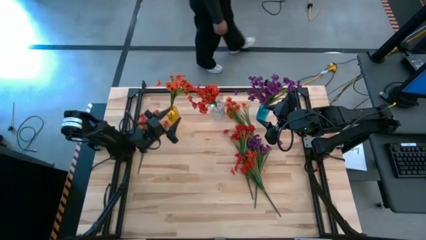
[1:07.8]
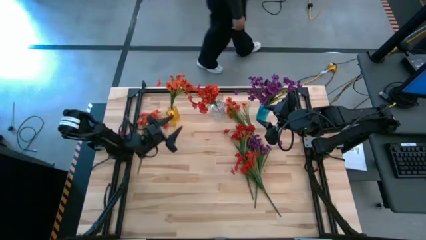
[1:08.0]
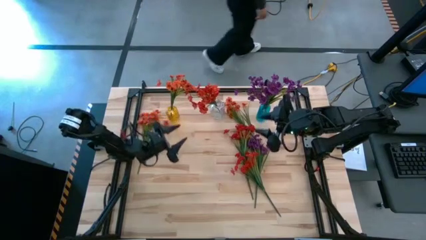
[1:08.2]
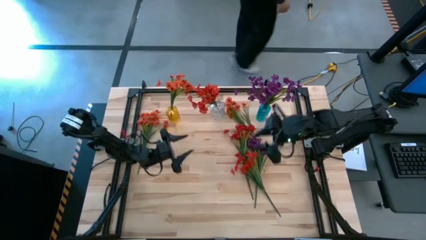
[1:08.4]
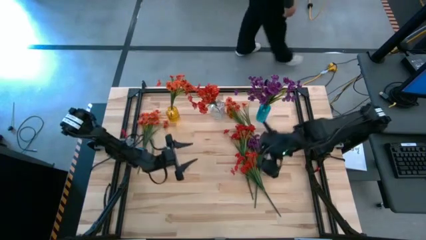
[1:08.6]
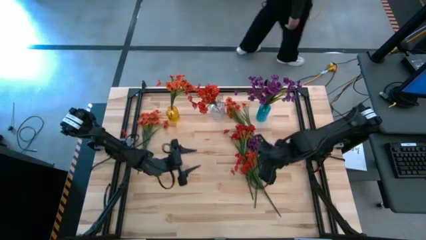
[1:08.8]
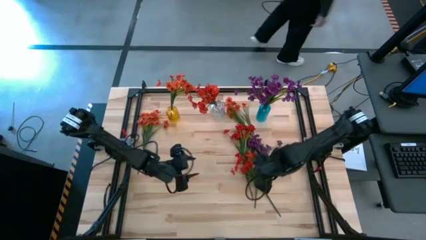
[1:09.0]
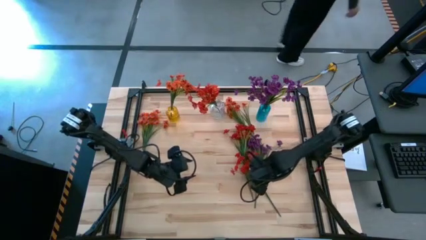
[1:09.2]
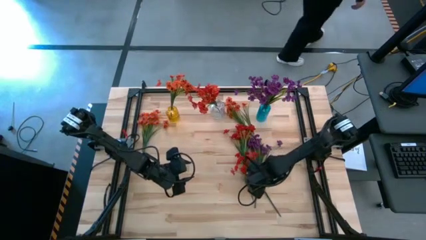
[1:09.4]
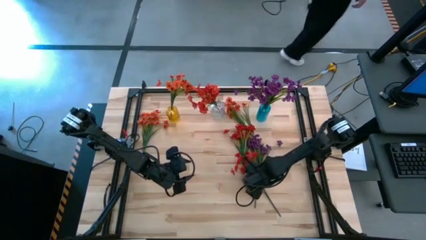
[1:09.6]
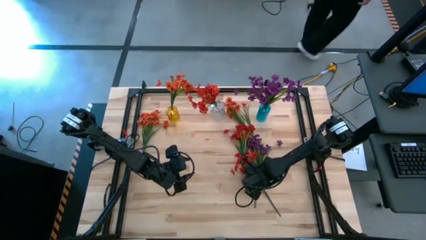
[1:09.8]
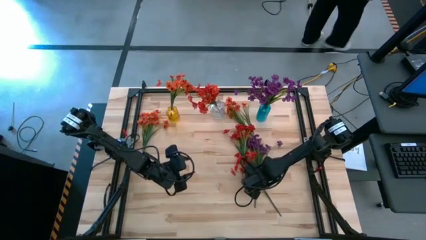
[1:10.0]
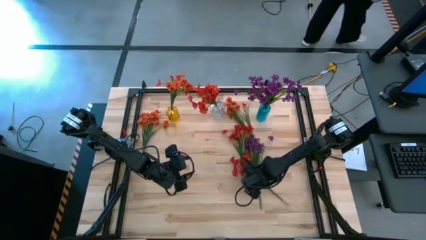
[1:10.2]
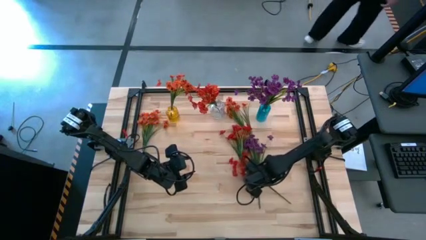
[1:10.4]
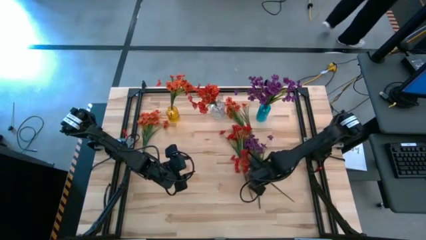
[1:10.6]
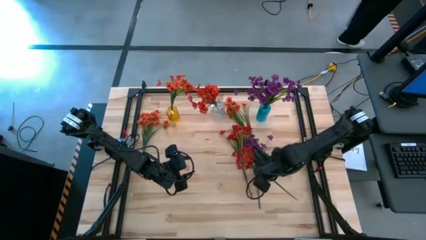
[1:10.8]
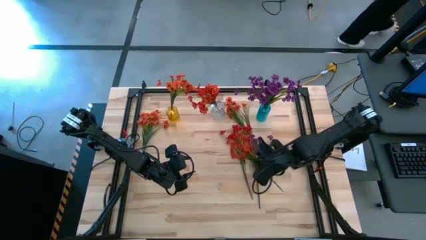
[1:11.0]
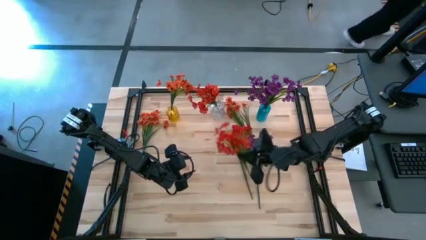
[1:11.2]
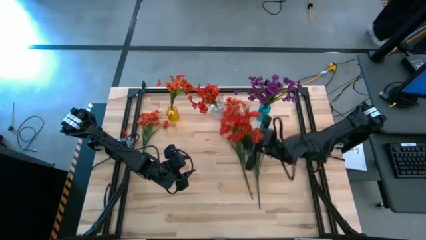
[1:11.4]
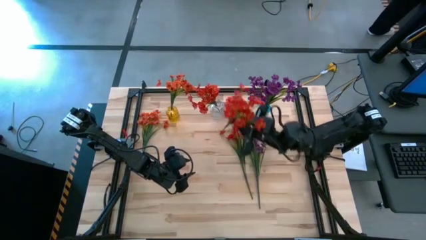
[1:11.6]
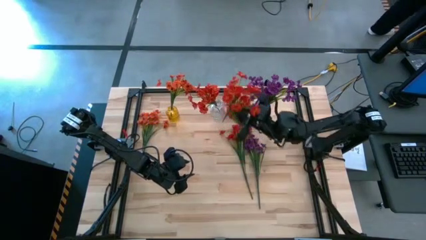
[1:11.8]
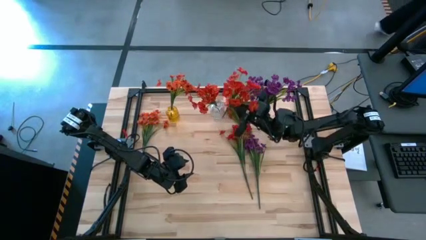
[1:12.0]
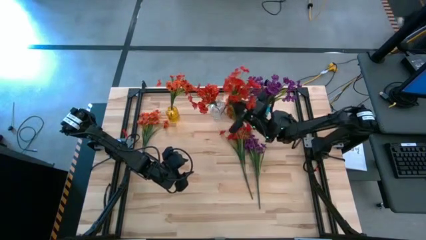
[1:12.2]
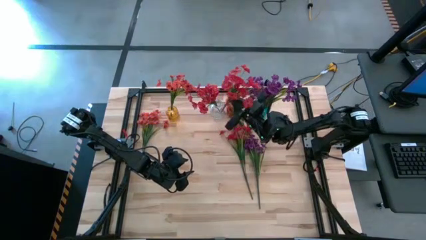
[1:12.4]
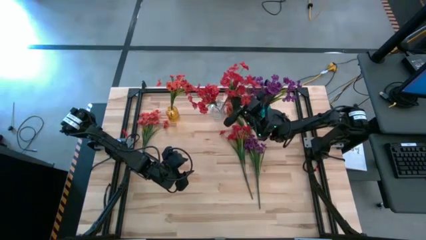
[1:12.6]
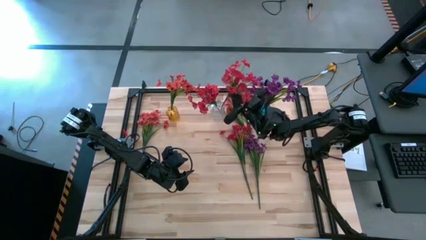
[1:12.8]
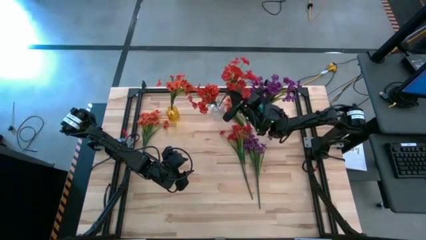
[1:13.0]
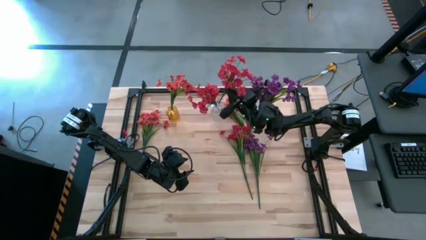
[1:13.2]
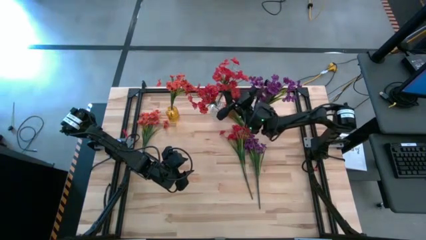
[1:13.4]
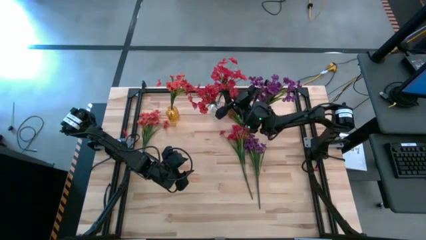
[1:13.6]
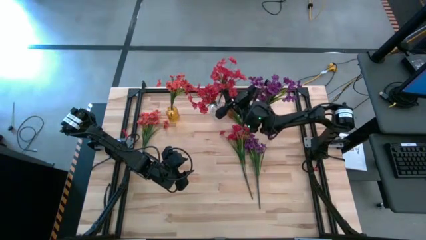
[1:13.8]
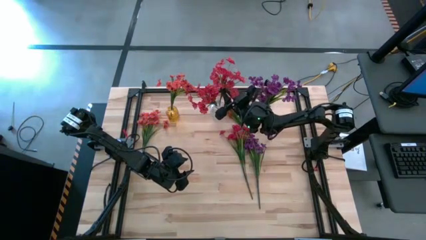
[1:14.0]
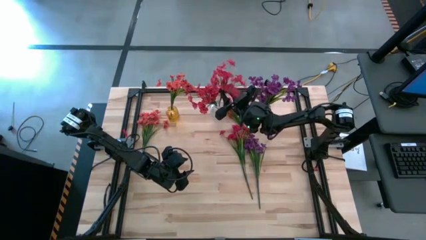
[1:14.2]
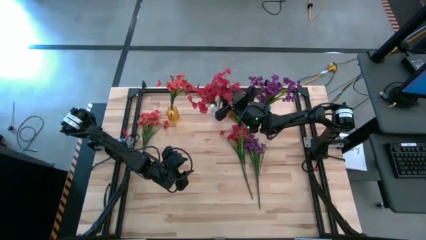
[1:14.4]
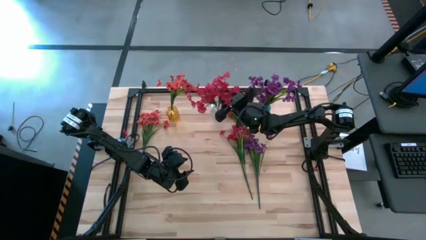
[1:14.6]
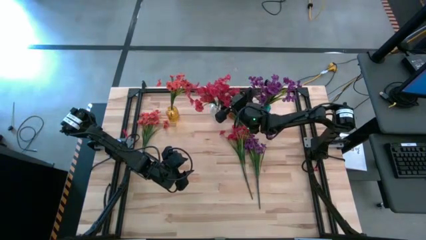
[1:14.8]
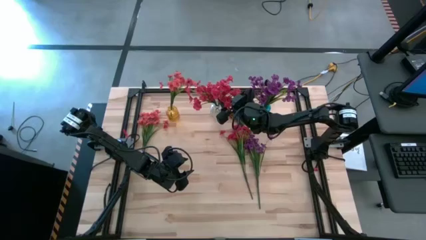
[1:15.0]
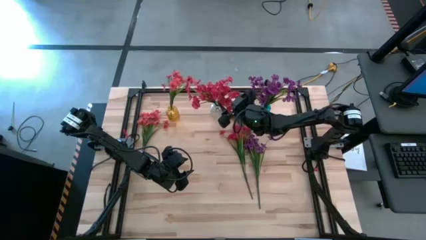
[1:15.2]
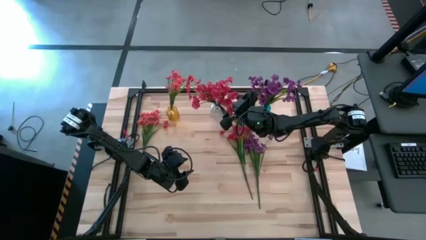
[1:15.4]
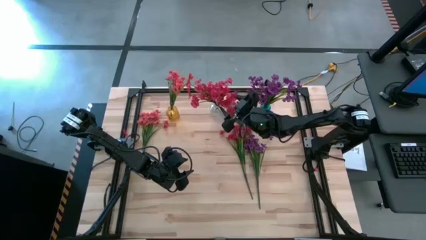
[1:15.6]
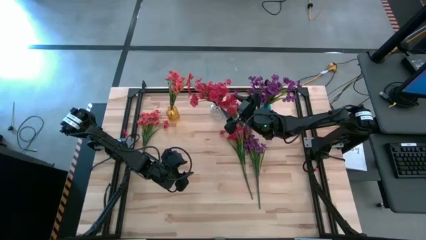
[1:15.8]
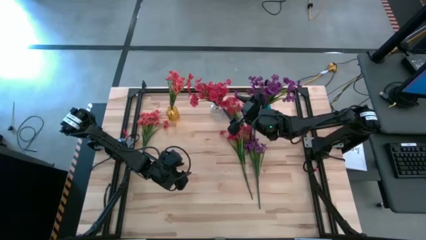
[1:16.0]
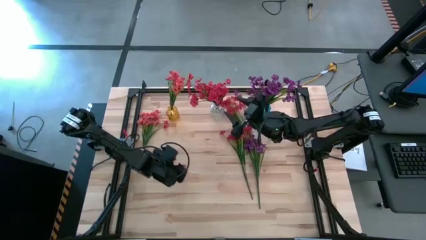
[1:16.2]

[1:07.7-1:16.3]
Task: Sort flowers into vase by color
Put the red flowers into the transparent vase

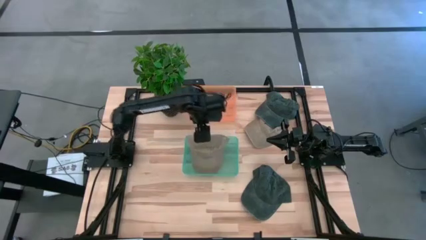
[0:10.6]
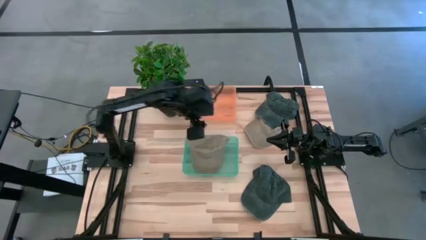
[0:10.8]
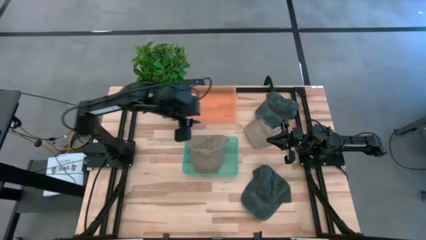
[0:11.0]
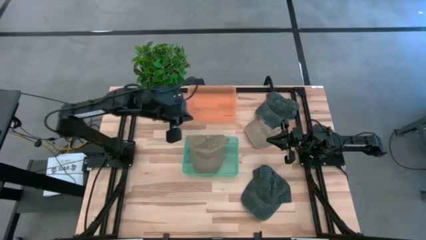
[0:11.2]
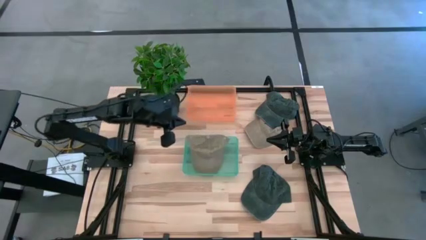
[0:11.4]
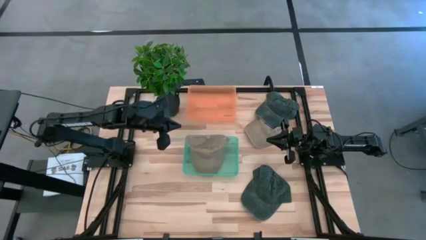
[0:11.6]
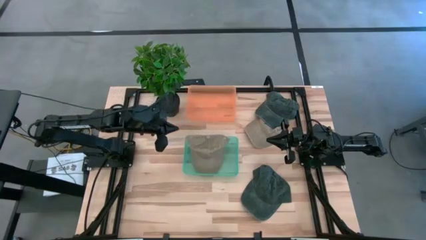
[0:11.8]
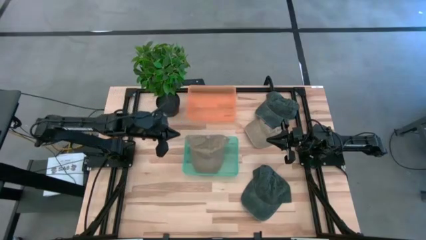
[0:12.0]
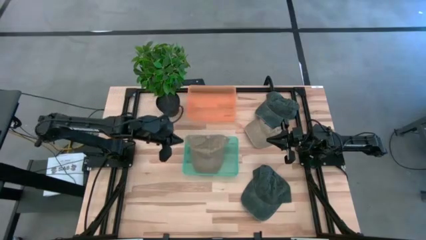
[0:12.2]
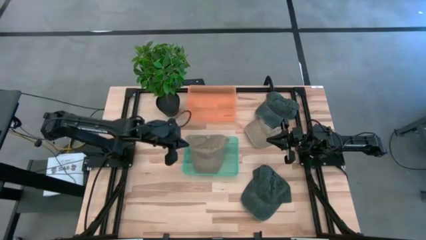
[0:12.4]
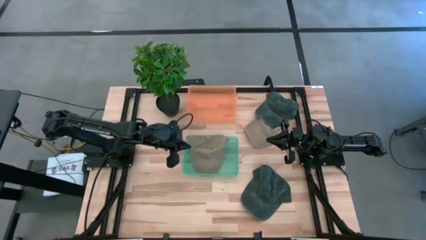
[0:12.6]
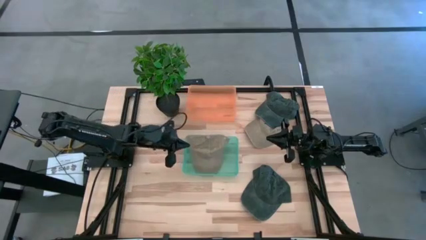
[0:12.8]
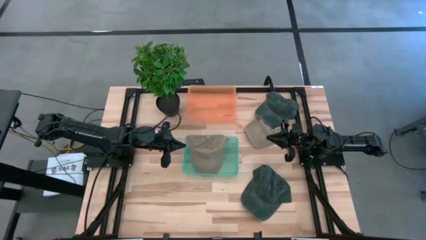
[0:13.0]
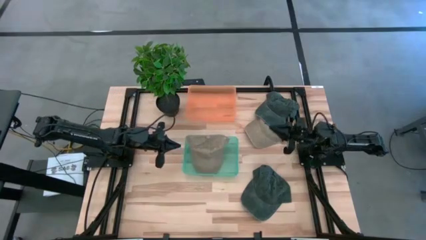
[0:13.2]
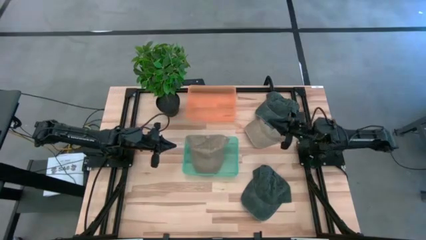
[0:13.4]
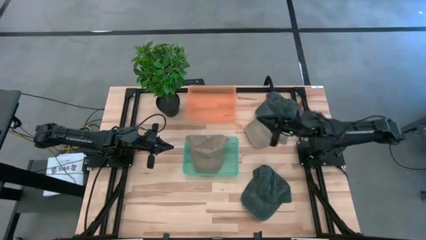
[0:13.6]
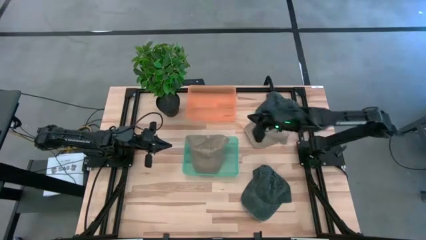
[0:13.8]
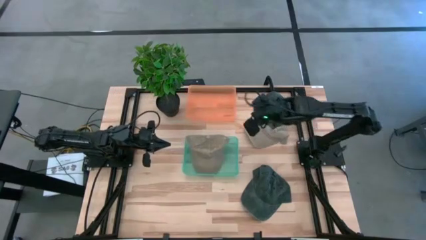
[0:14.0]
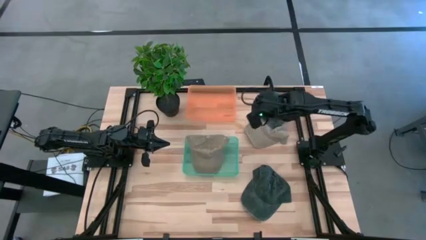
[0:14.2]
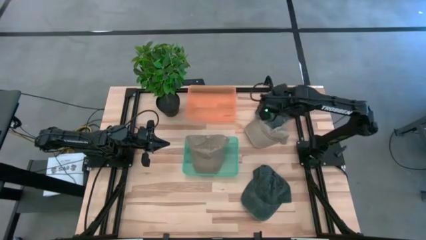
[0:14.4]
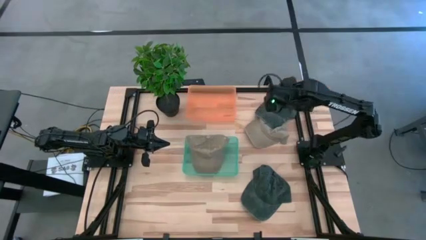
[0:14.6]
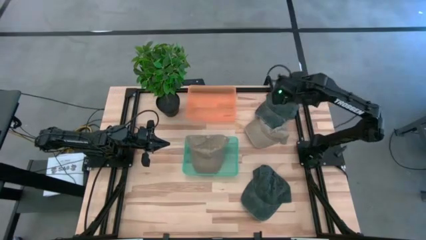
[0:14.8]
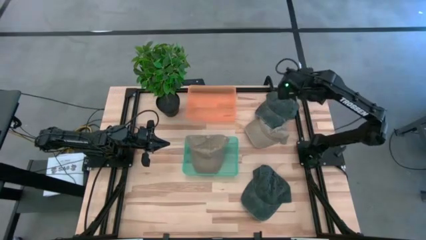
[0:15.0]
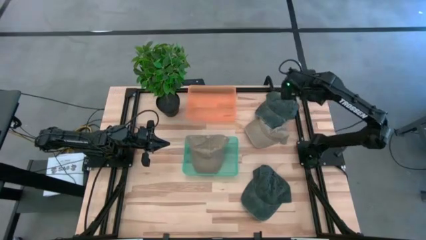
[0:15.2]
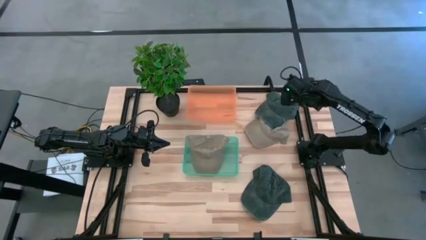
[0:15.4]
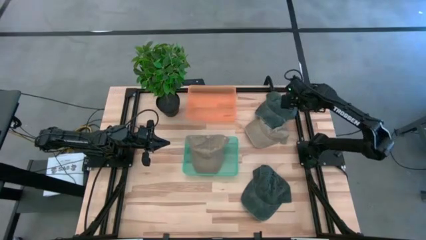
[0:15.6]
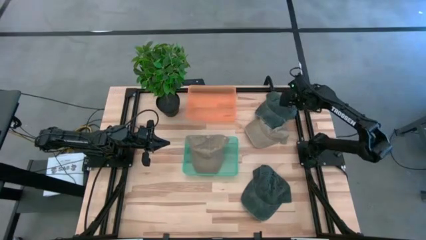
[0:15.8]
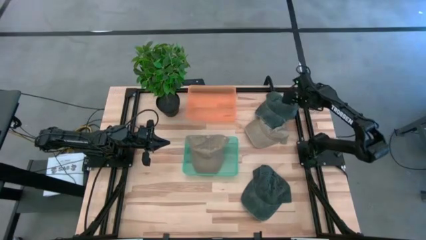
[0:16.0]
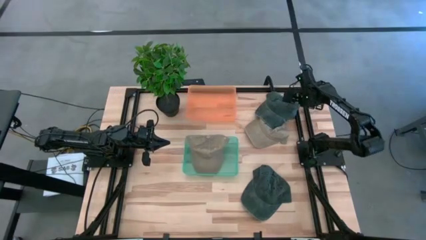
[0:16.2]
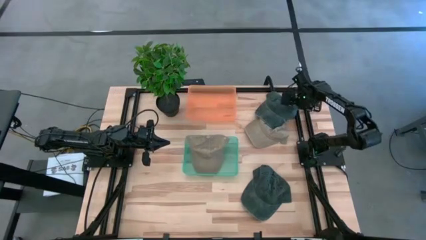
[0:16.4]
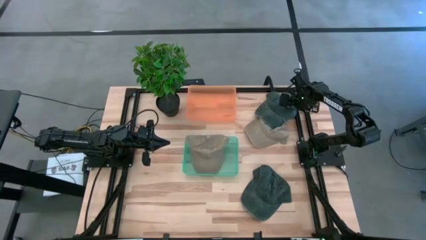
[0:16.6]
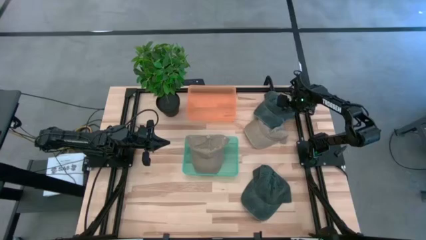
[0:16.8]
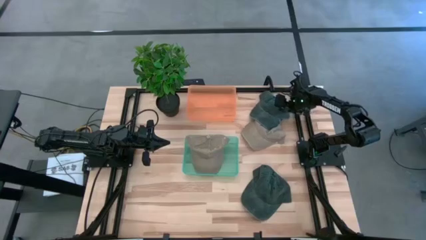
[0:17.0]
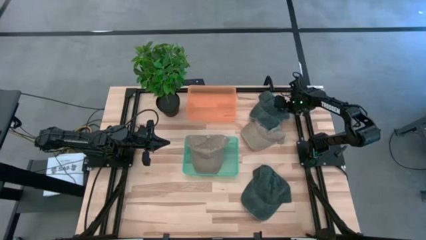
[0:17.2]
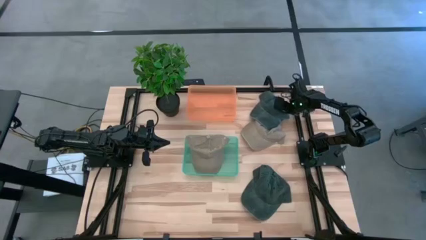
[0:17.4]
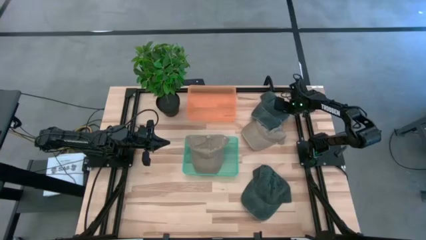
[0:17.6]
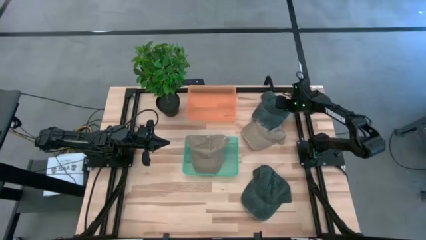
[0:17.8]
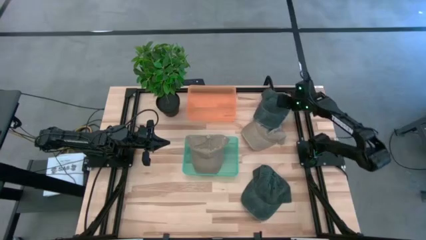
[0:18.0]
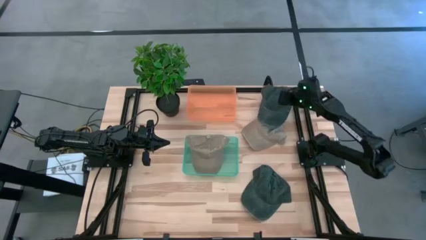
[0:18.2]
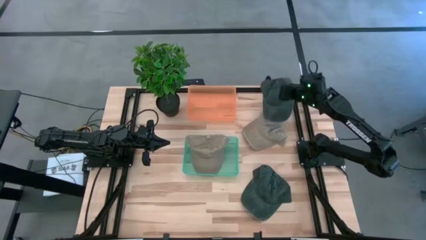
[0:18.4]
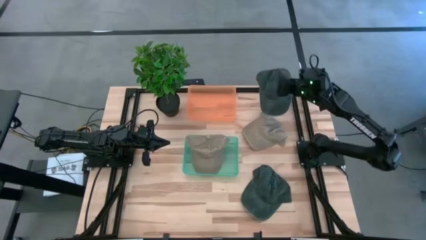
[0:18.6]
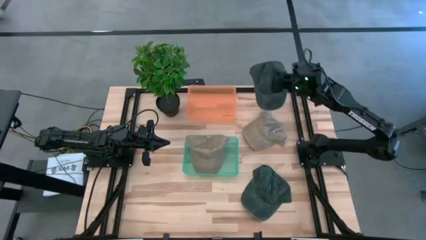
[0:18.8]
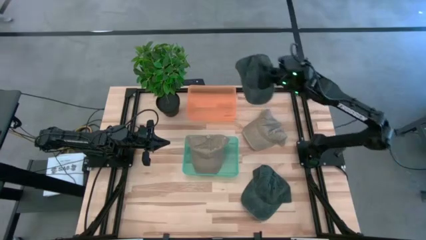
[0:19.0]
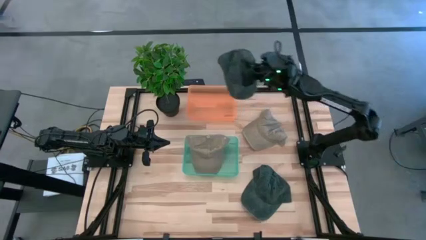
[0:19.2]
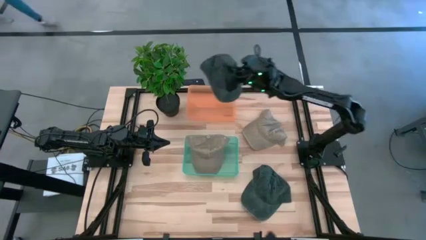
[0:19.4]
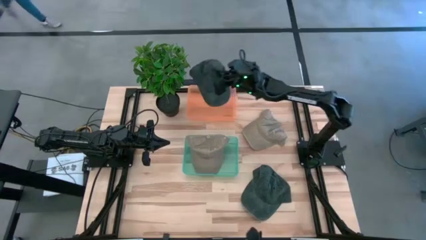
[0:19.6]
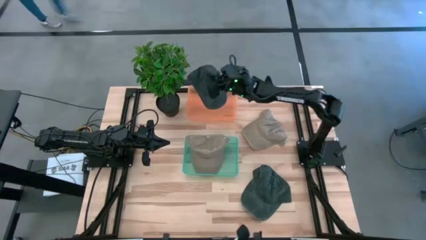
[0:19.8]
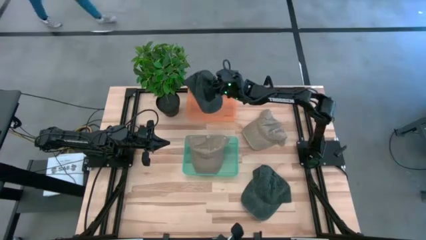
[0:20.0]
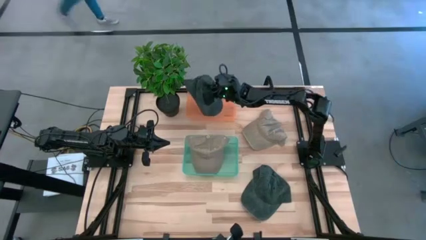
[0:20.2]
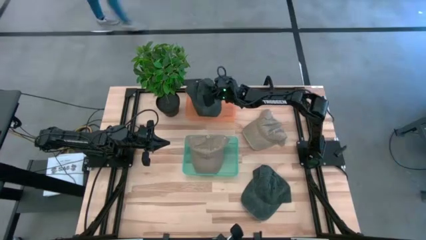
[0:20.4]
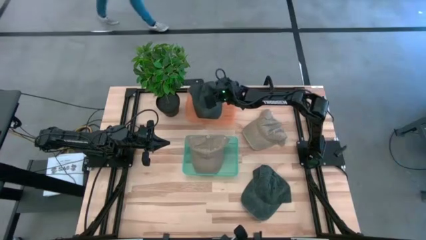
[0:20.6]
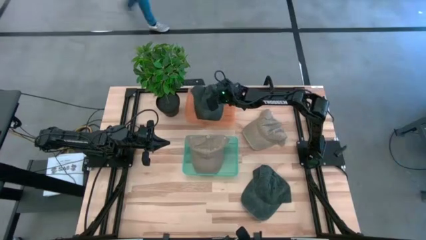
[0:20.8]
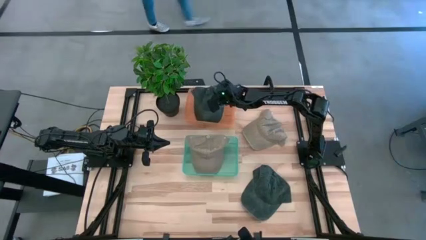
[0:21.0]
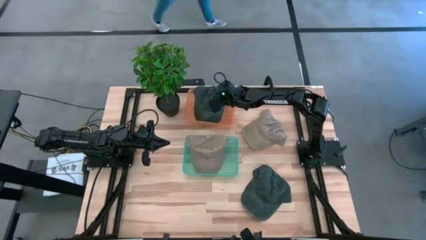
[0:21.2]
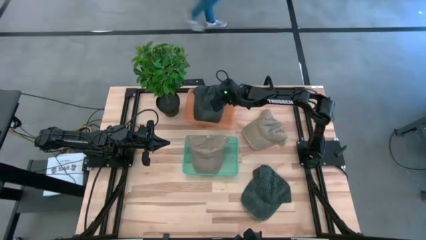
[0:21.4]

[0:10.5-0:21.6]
Task: Pick & Place hat
Put the top black cap into the orange bin
